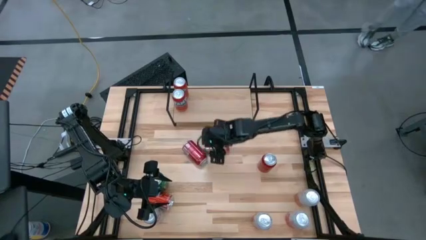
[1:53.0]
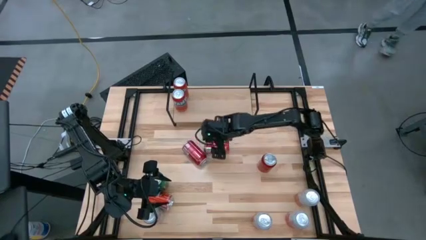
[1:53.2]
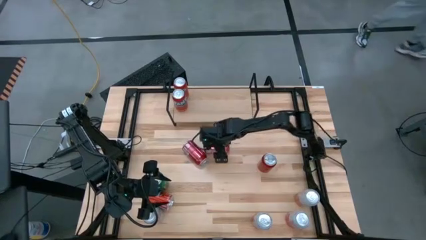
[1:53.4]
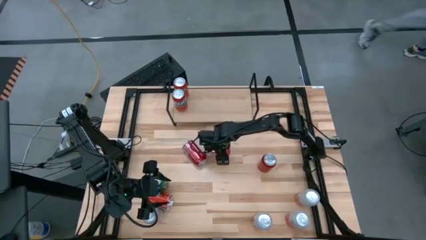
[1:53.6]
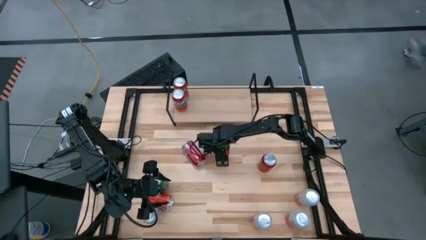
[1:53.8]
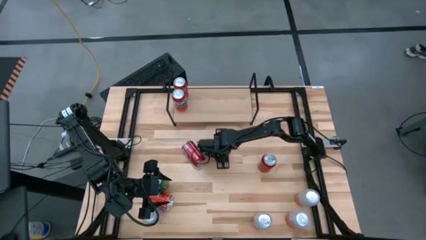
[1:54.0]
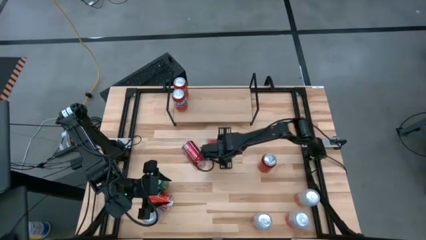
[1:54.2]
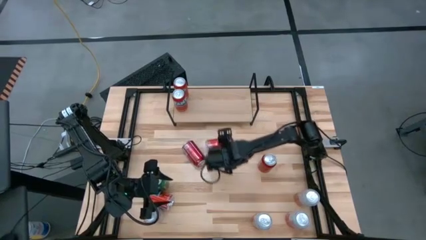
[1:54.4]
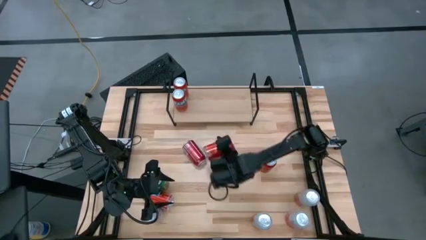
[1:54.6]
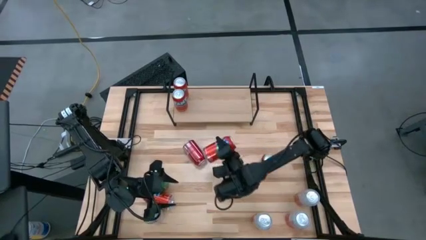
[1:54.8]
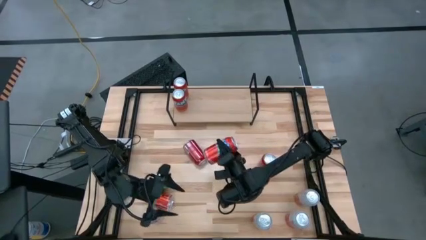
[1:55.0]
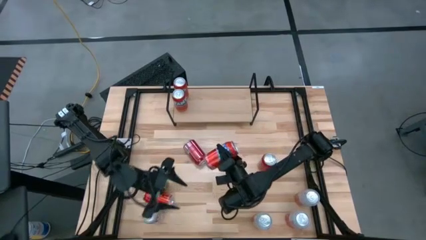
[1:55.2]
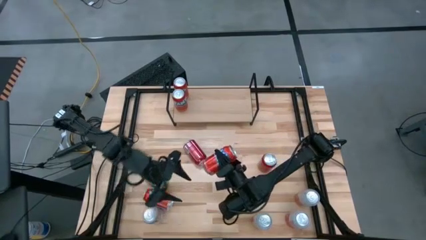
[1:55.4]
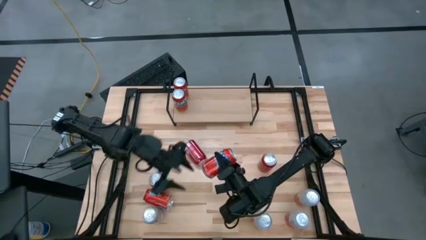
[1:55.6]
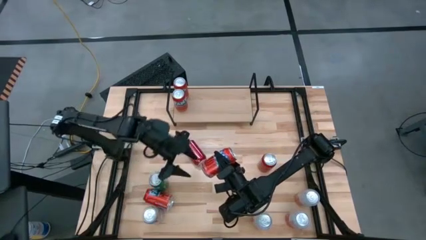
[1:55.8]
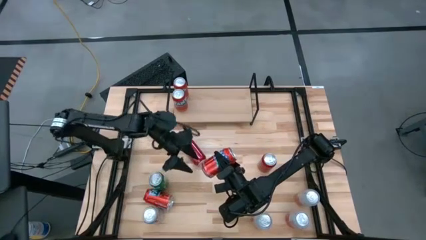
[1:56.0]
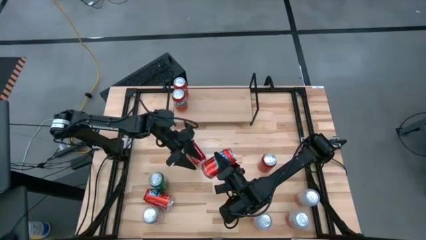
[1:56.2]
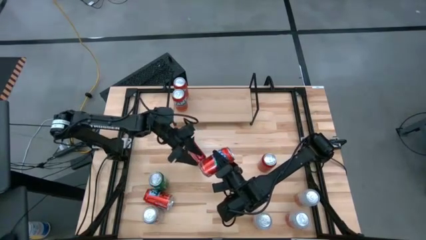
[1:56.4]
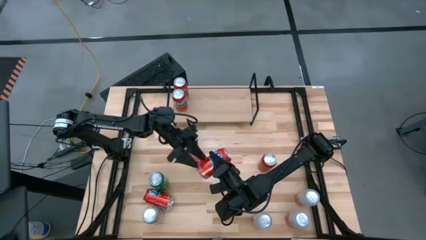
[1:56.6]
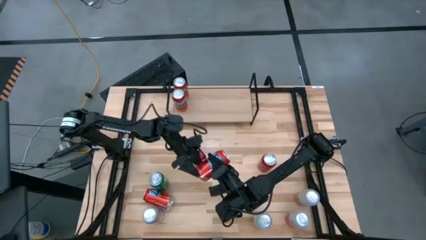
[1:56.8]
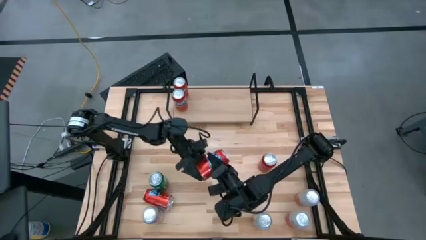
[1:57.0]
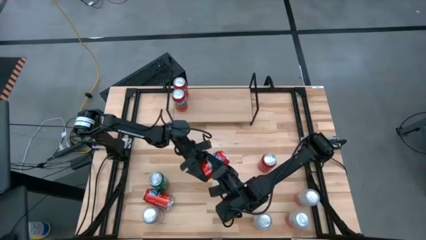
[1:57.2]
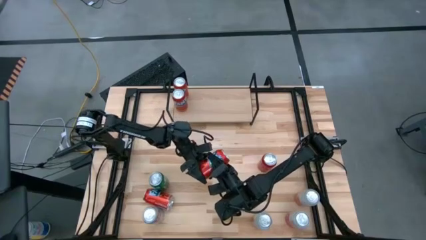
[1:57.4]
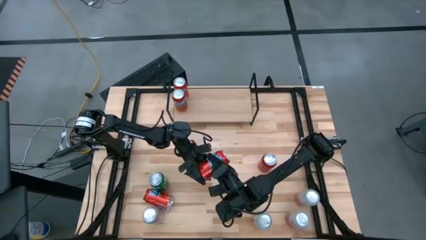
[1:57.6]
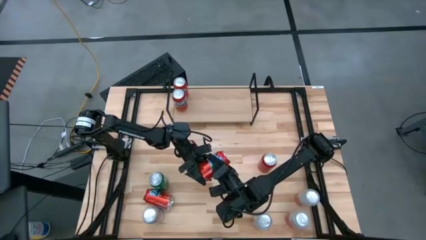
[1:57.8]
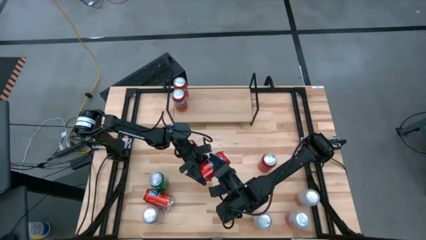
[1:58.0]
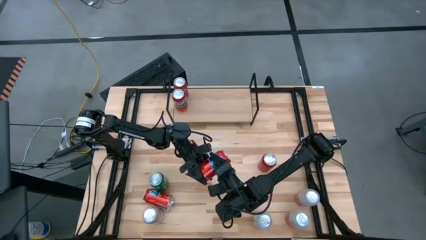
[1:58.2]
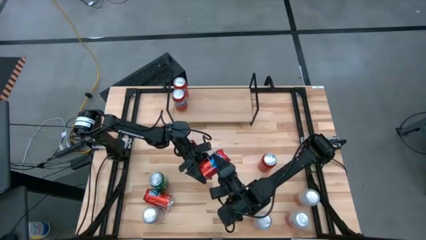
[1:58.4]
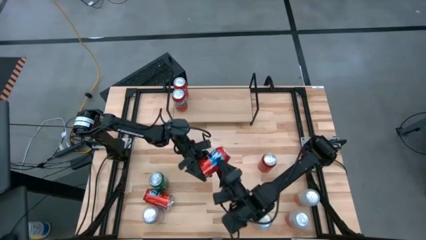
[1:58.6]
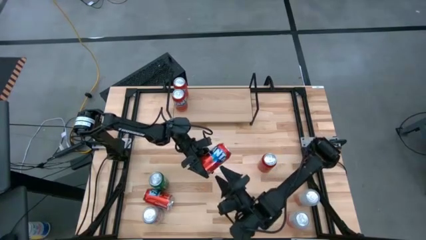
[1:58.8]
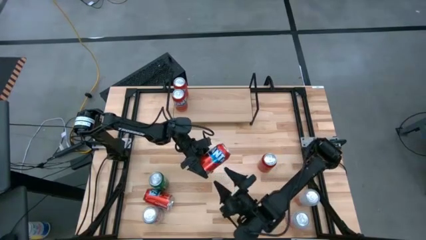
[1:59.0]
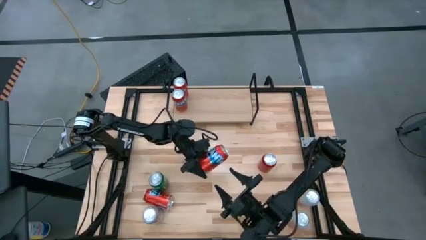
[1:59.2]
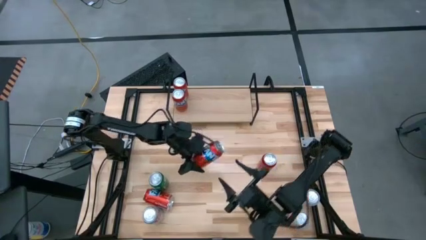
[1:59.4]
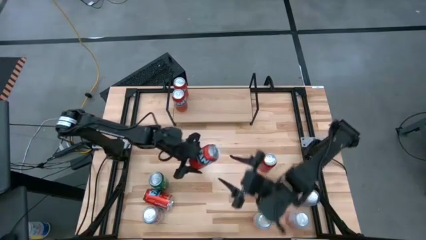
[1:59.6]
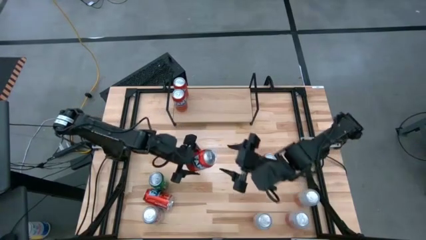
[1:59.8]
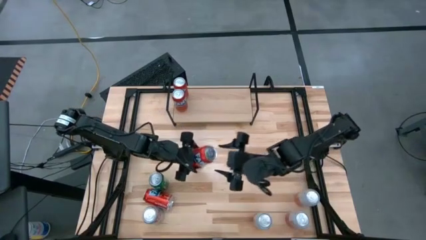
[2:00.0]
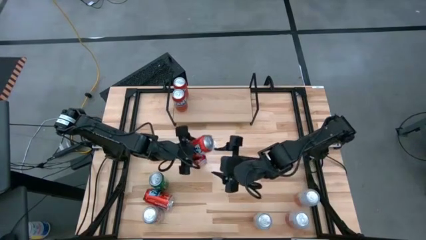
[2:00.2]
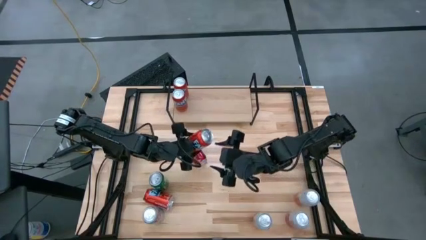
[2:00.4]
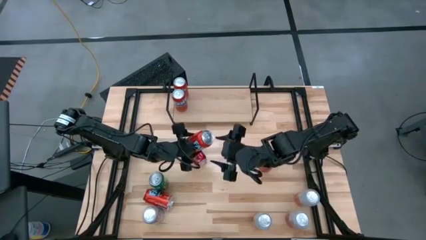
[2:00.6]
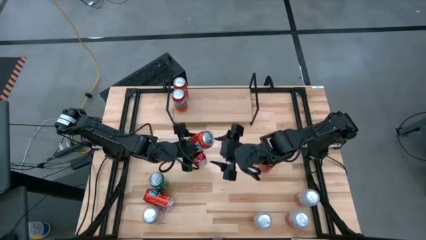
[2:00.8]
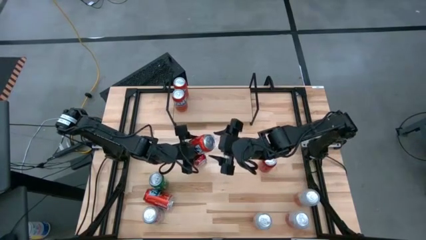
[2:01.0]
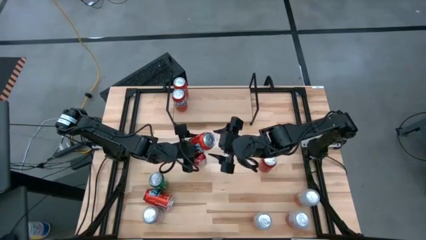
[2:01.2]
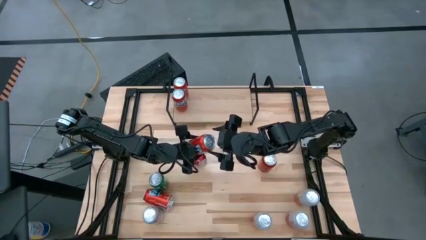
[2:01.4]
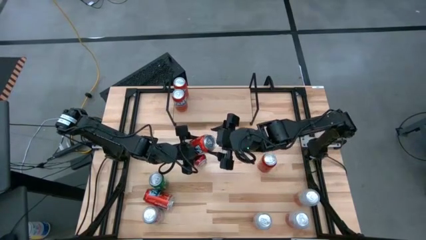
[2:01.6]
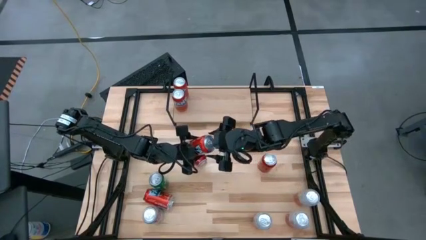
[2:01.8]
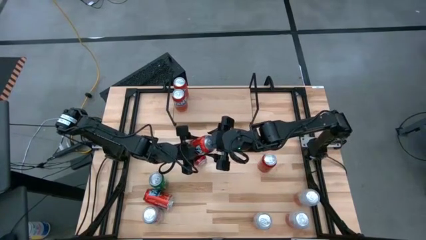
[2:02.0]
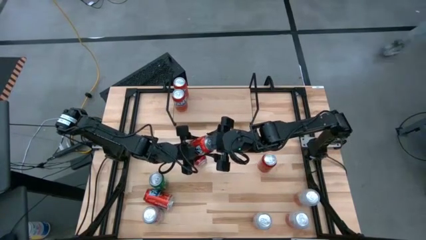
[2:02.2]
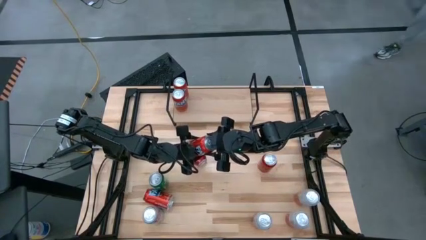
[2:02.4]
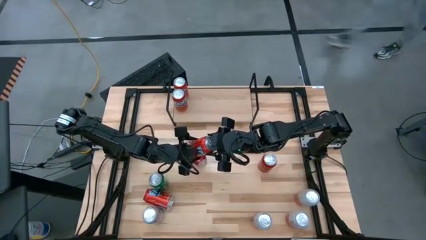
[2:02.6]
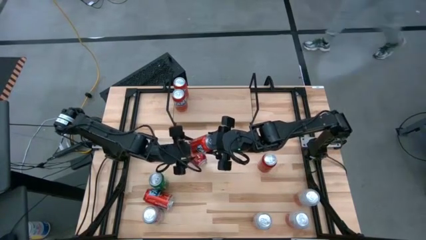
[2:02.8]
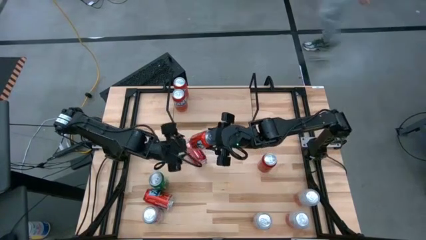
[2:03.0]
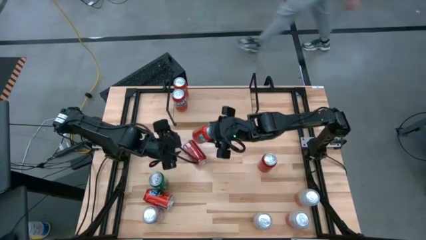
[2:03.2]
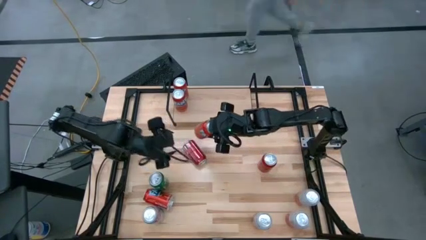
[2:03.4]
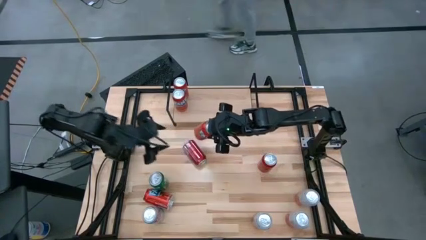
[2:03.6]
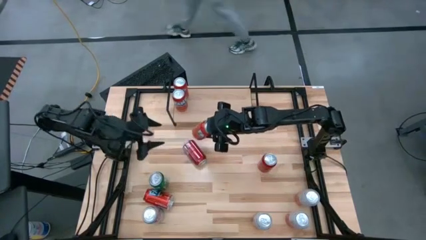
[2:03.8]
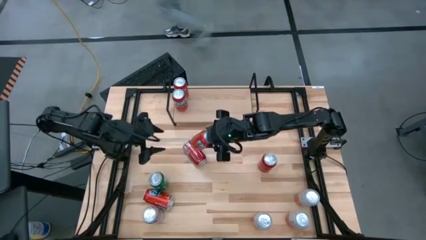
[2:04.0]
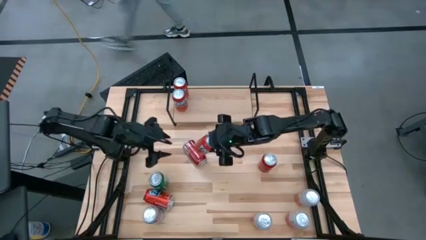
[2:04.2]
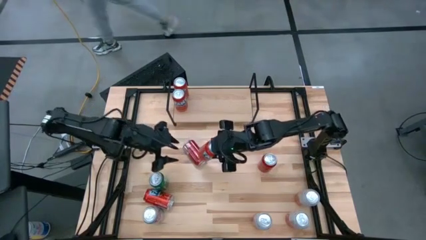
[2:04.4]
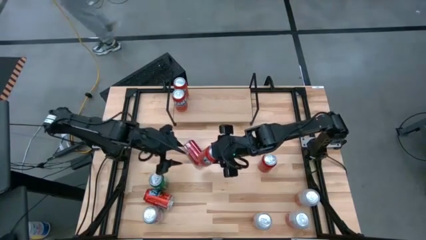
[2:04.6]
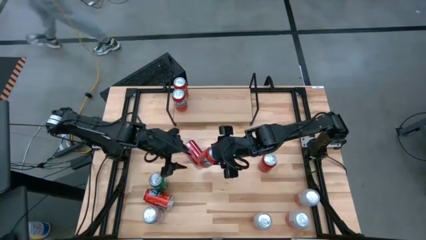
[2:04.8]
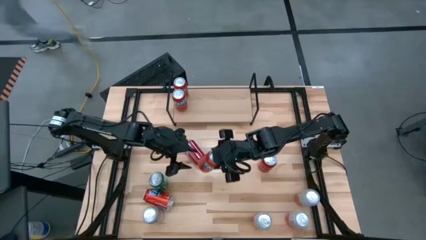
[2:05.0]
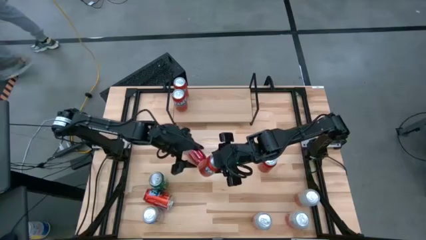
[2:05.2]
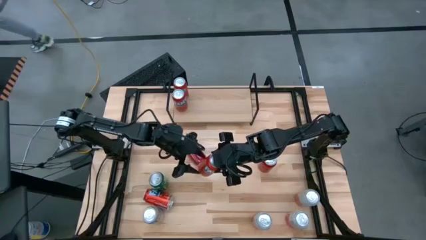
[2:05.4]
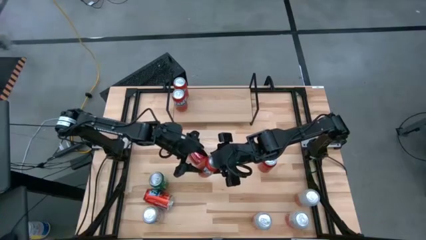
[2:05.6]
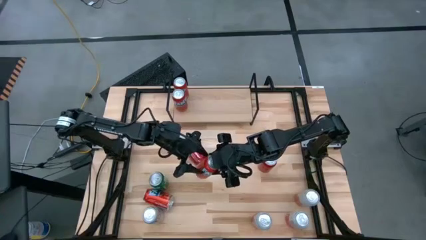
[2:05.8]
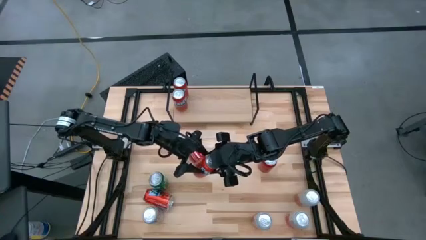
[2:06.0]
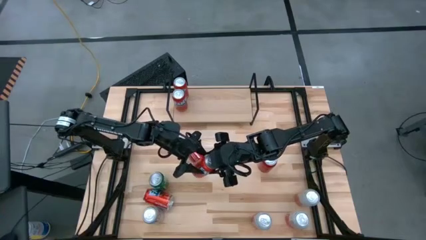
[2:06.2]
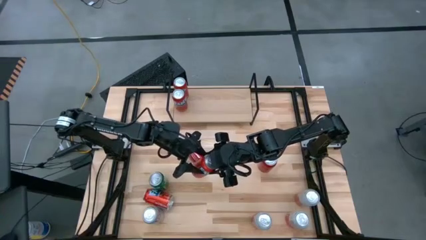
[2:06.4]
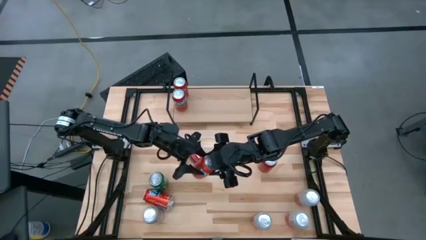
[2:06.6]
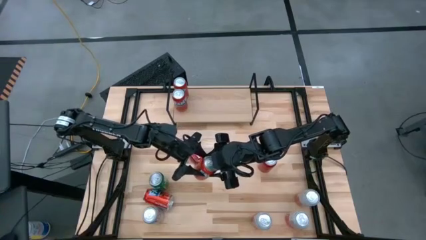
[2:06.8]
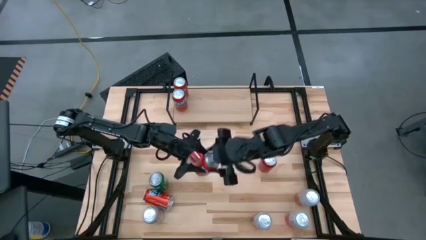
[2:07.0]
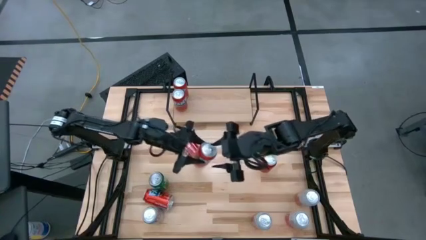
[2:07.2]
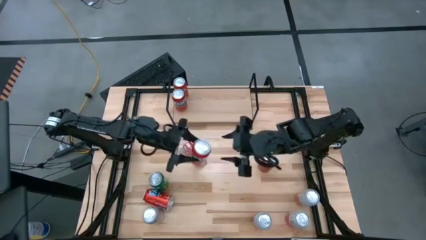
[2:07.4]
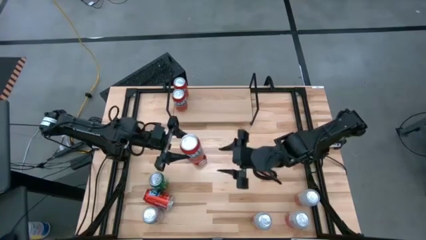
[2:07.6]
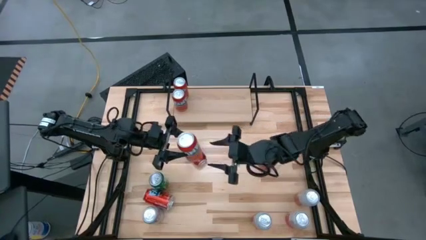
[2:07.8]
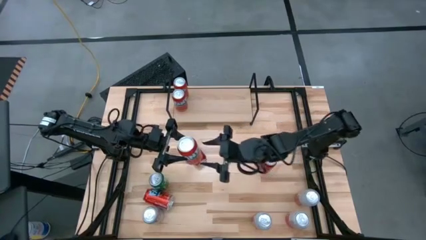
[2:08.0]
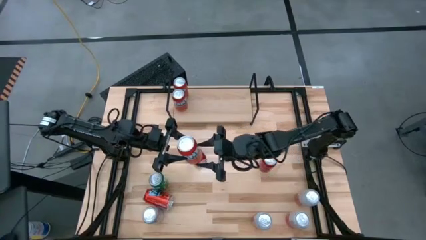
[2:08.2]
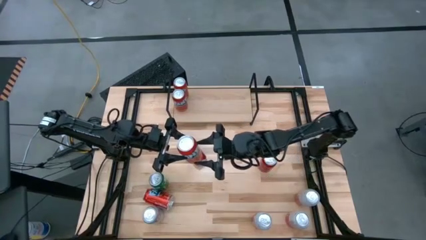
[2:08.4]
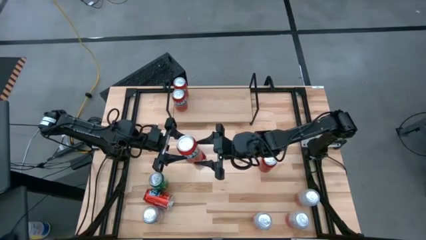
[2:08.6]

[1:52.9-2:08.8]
Task: Place canned beverage on shelf
Put the red soda can on the shelf and align with the other red soda cans
